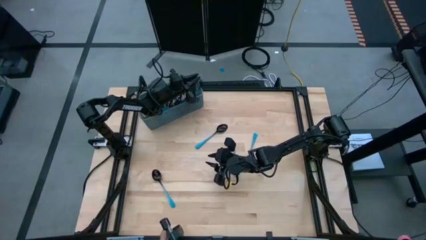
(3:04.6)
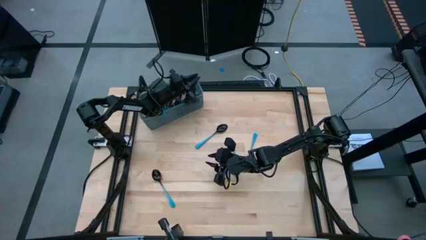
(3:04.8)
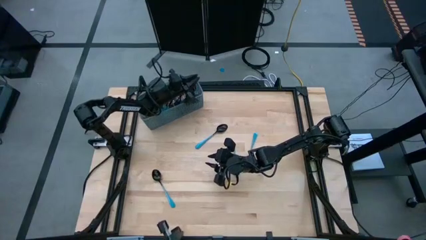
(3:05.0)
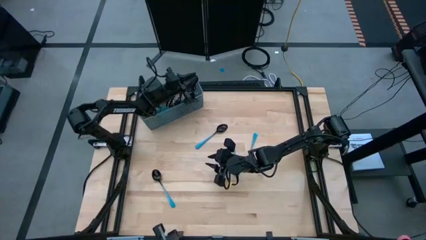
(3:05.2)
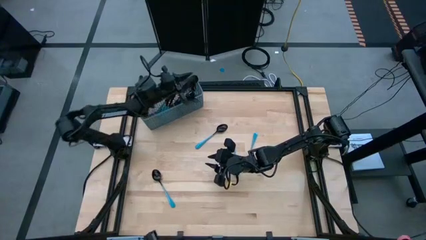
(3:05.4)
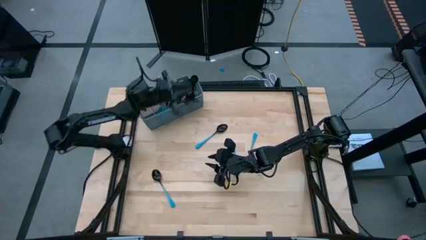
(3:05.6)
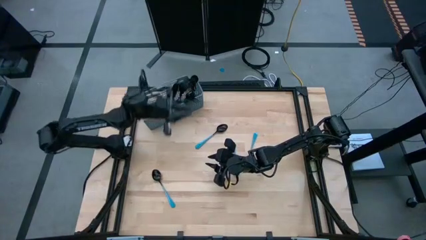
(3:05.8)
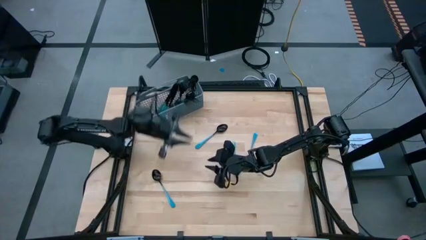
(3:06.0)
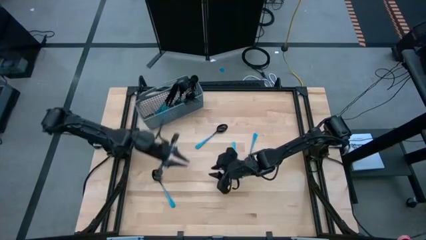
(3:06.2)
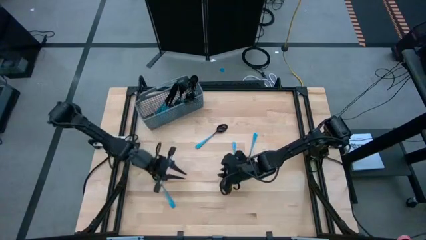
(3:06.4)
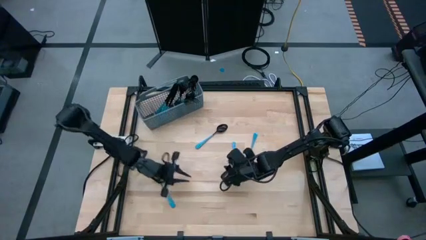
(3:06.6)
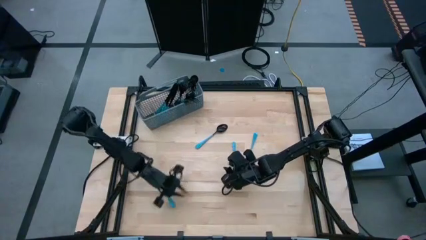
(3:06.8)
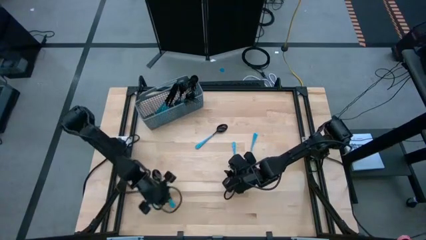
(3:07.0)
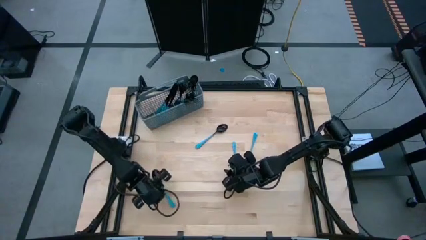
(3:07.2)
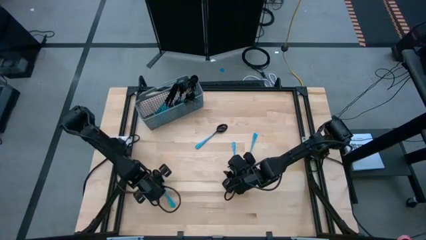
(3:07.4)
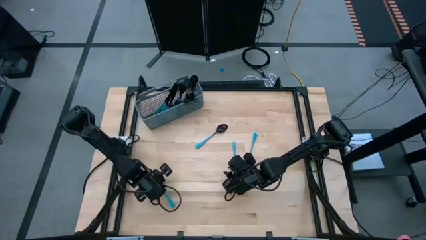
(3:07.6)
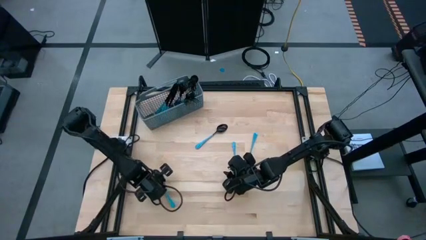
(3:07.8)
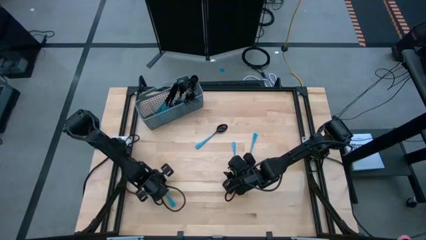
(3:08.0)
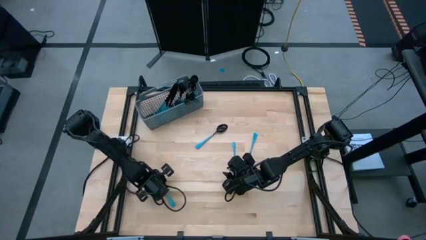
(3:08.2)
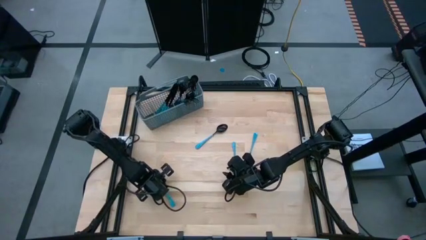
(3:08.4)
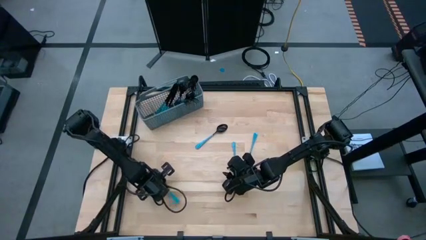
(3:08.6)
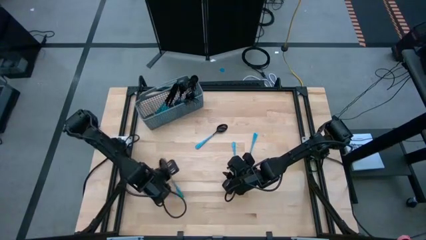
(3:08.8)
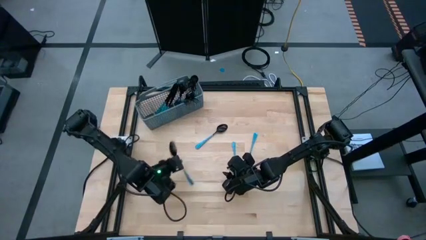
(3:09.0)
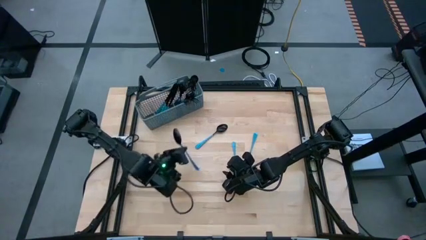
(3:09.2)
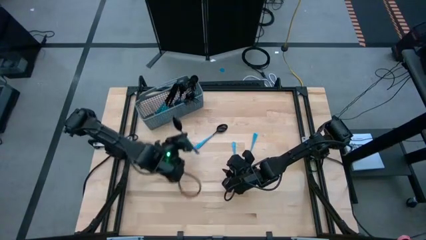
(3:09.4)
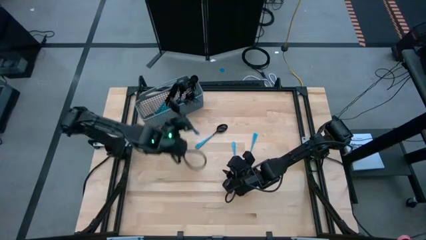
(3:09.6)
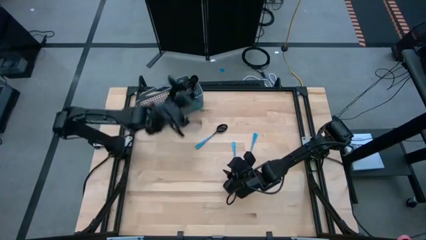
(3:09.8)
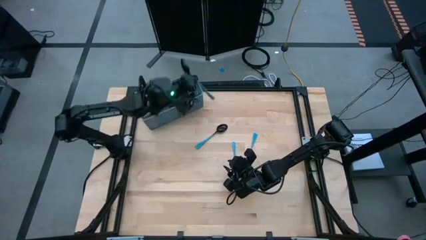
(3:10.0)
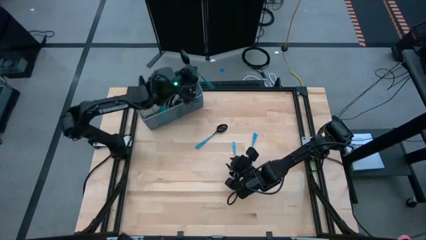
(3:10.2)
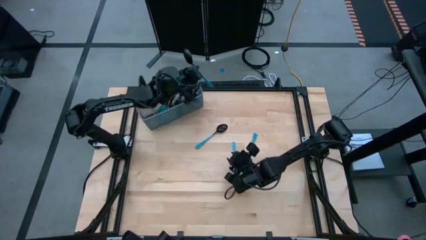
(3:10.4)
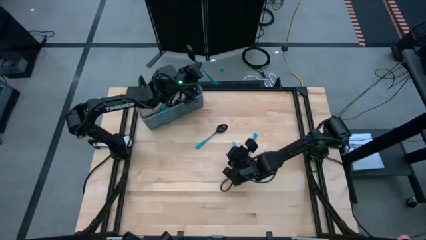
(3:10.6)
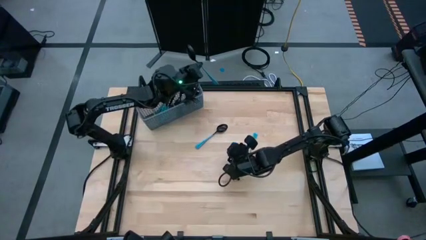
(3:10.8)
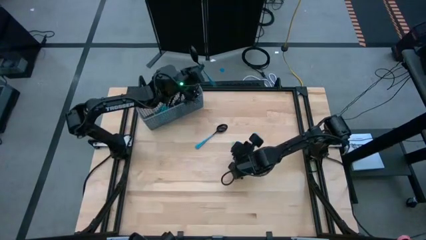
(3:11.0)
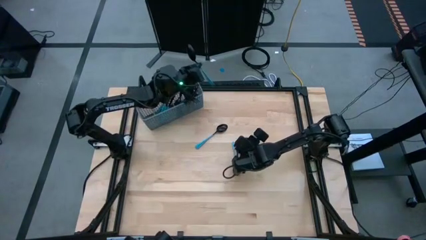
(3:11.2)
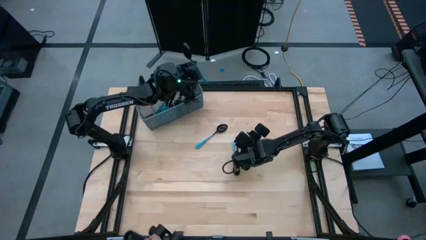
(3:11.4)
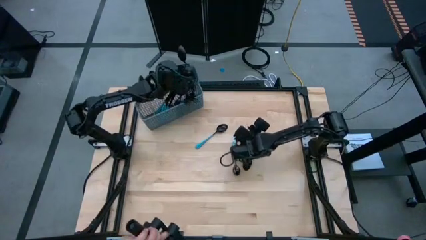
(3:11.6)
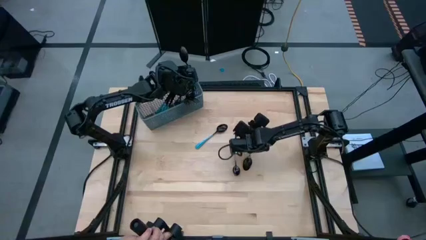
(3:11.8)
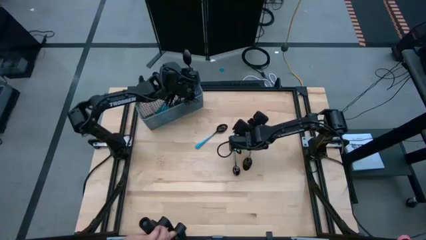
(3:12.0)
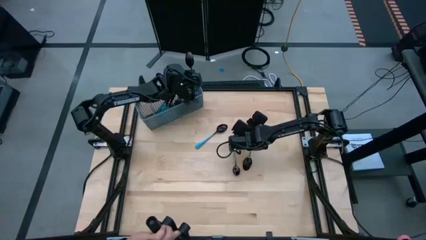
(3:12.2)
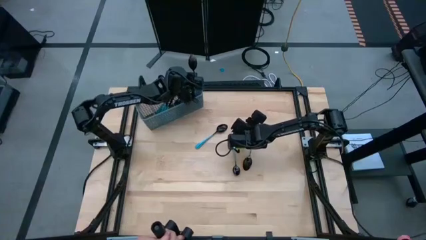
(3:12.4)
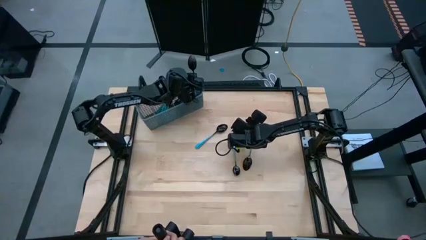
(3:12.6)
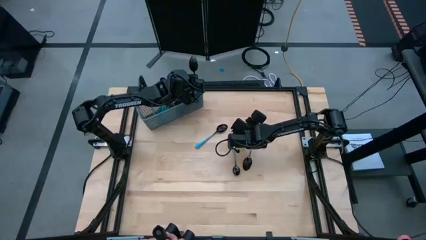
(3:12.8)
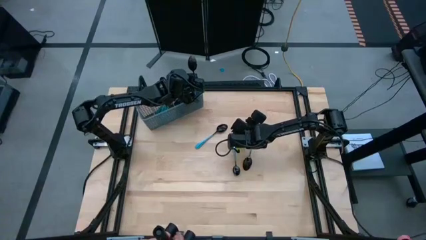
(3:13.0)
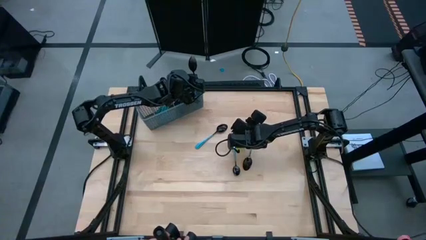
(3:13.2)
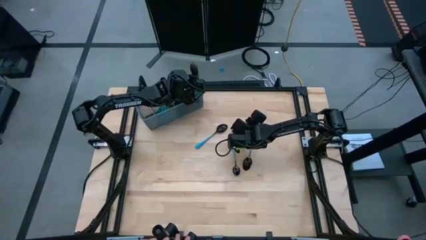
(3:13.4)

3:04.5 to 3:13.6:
Task: Sort silverware
Put the blue spoon in the dish rack

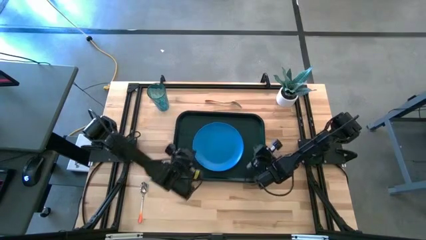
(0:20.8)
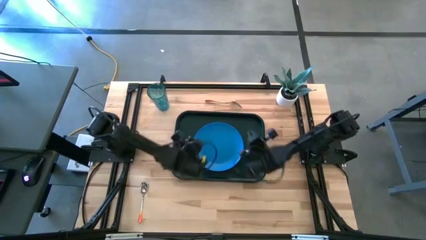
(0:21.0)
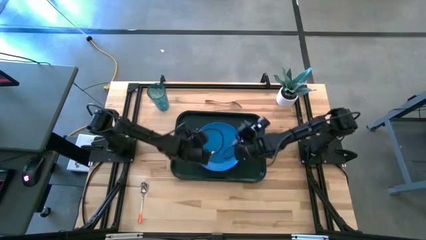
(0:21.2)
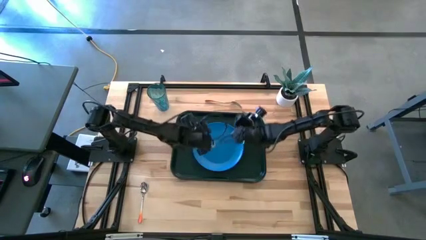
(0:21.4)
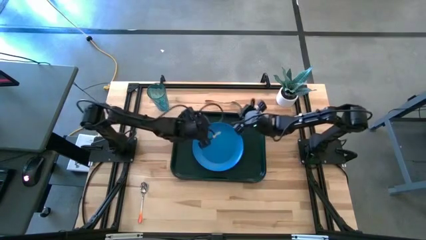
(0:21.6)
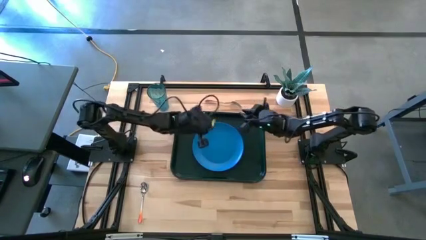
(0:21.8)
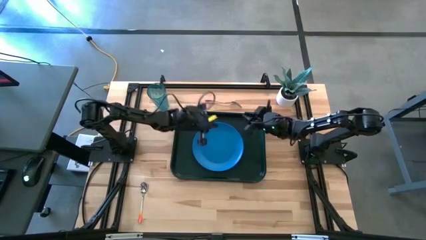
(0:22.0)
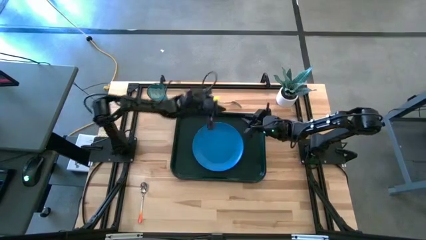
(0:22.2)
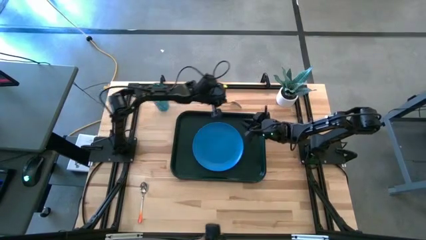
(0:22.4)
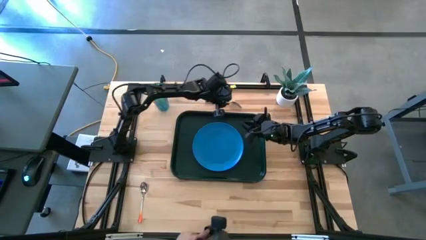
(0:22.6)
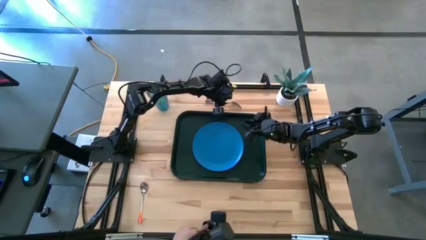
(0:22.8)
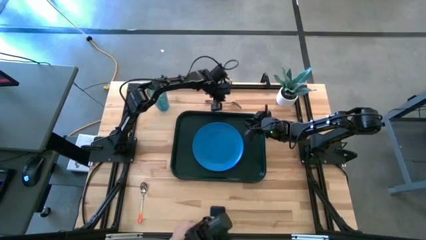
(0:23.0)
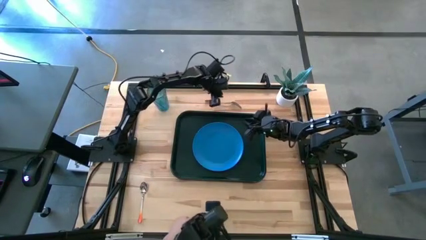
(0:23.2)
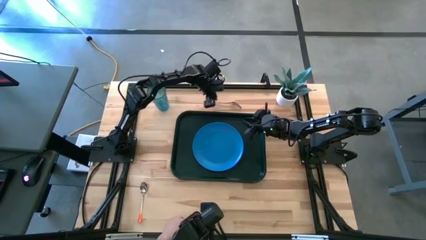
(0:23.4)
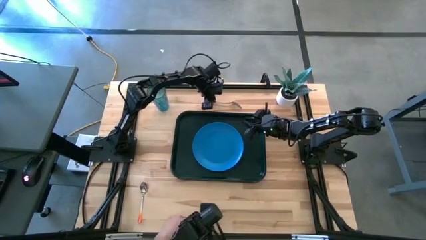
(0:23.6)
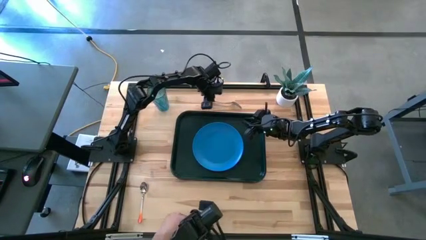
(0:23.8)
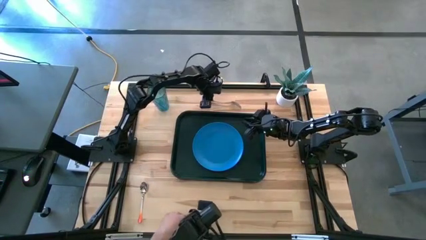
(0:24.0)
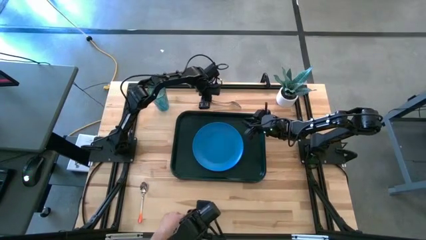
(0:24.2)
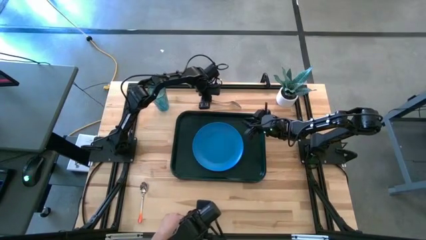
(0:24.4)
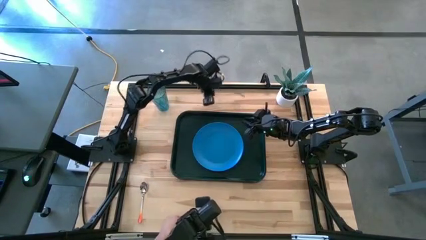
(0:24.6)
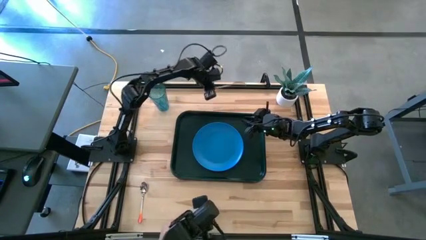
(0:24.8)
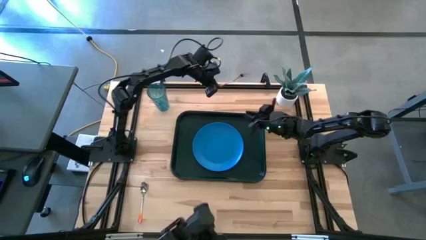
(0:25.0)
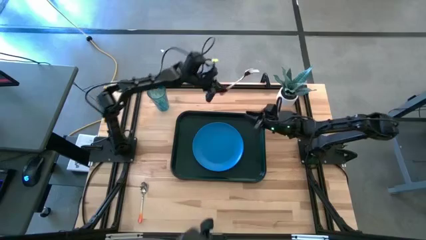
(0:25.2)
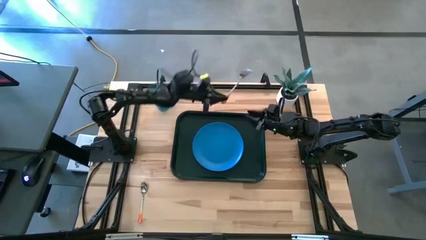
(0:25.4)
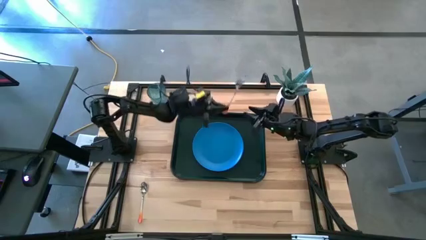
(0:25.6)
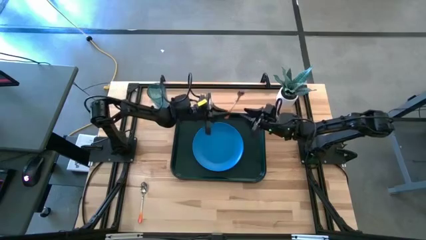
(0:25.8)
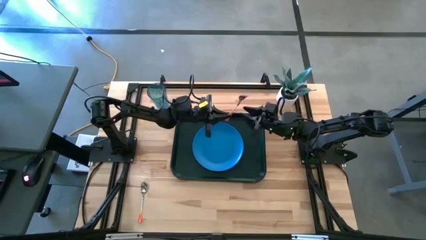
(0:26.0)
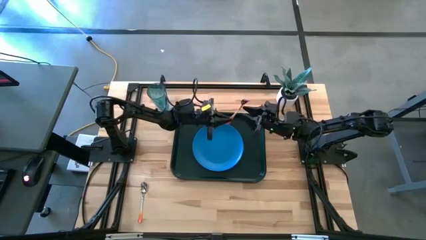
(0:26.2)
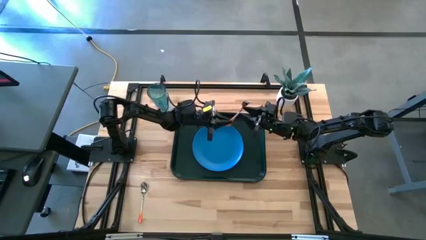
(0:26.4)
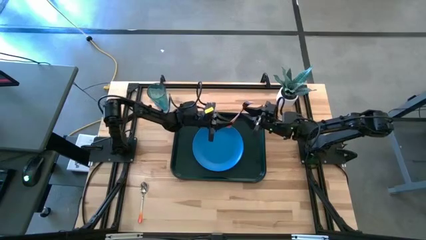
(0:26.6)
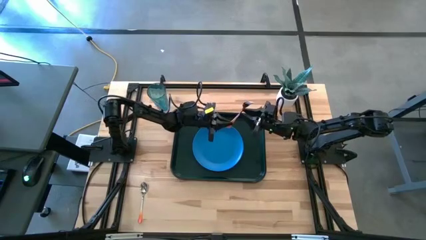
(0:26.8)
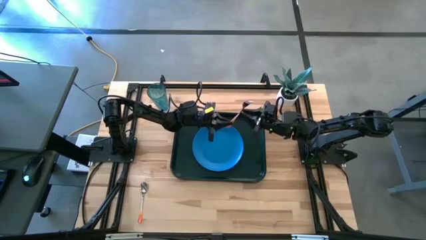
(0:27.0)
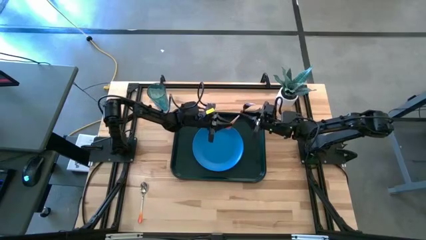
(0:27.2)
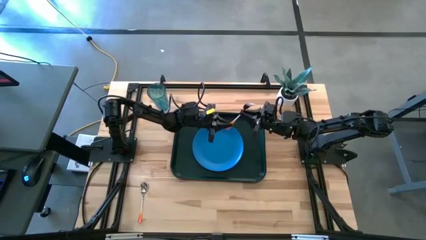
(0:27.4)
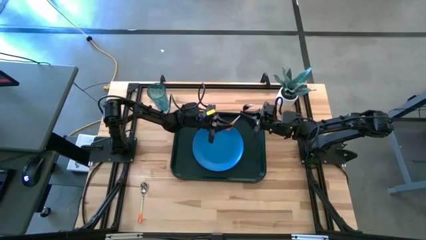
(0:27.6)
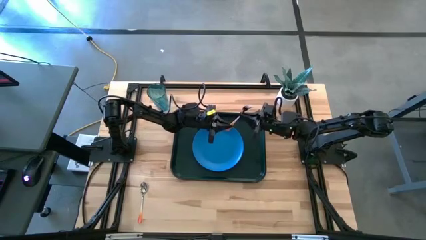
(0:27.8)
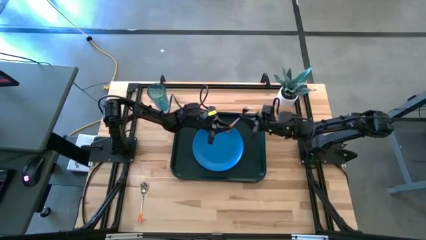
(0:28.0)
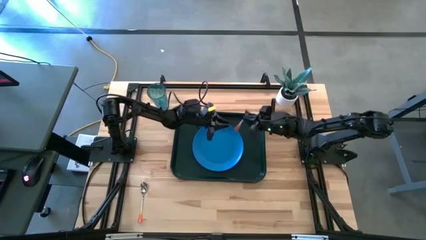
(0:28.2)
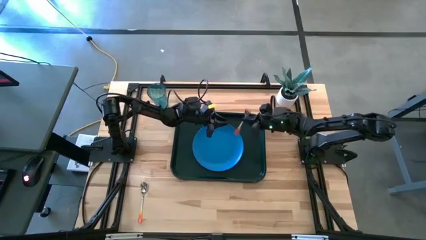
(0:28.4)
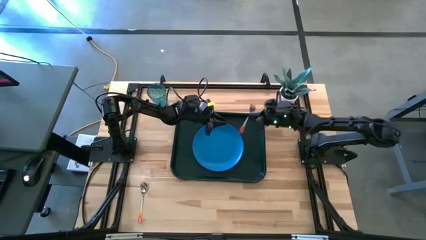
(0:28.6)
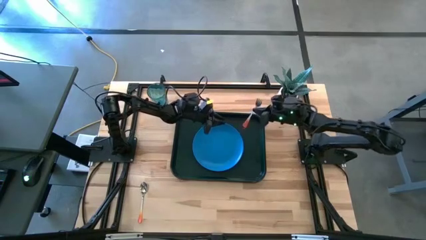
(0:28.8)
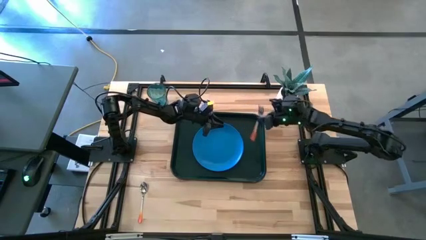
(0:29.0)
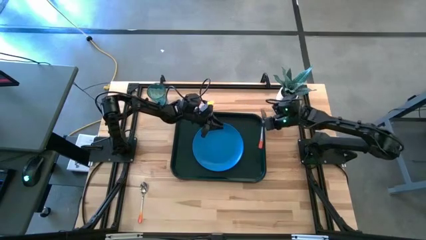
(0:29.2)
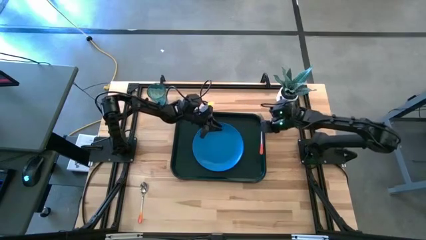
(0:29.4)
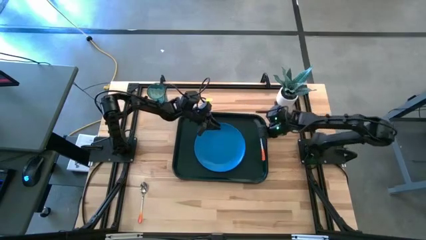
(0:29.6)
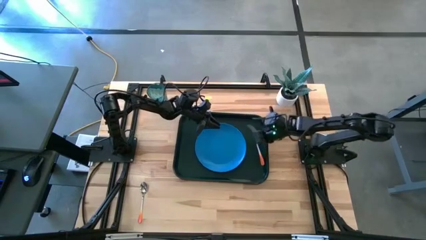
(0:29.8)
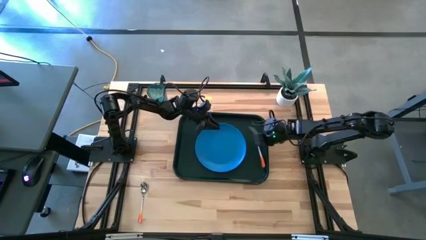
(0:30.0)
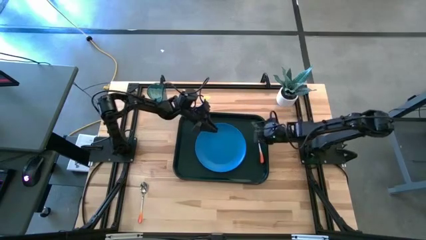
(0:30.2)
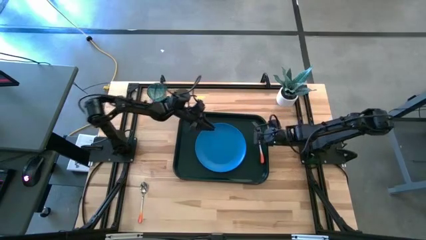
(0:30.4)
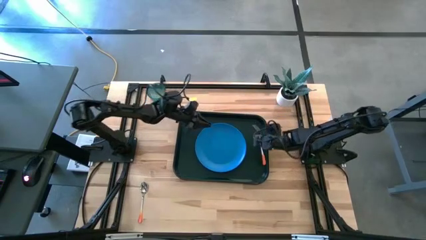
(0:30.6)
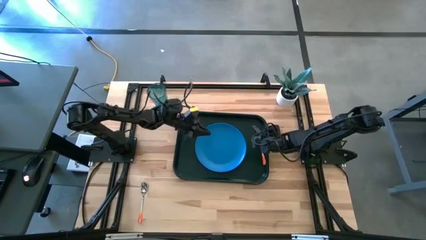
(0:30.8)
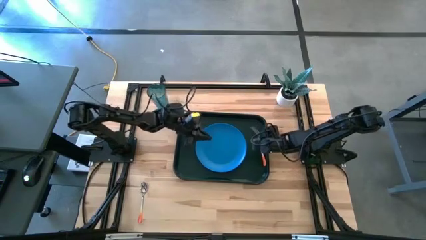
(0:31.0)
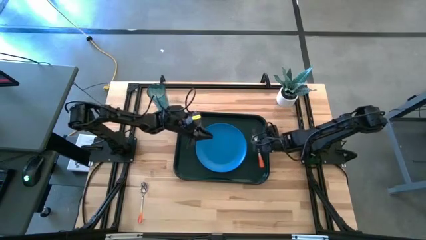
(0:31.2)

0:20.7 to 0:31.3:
Task: Pick and place plate/cup/fork/spoon on tray
Put the orange fork on the serving tray to the right side of the blue plate
